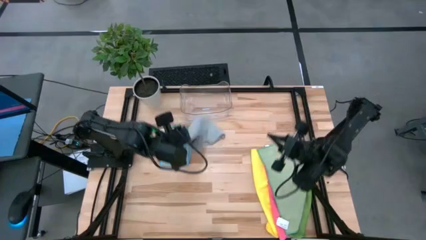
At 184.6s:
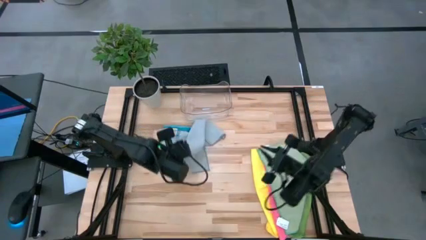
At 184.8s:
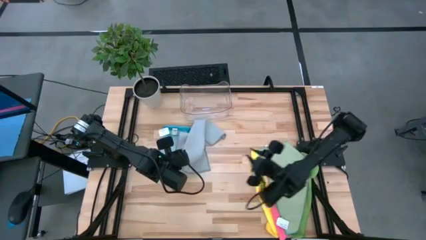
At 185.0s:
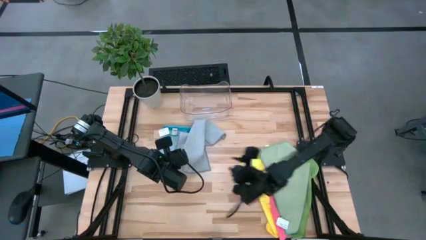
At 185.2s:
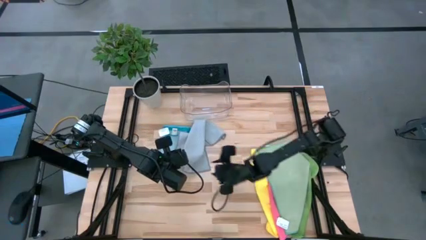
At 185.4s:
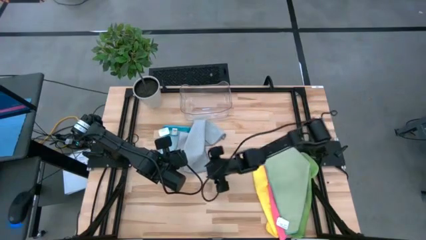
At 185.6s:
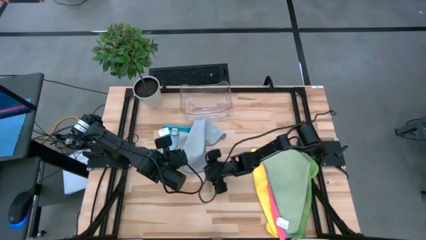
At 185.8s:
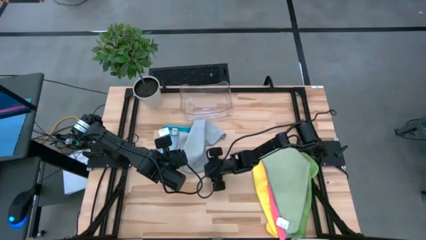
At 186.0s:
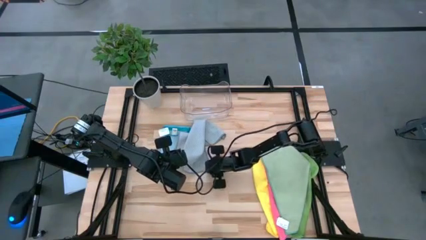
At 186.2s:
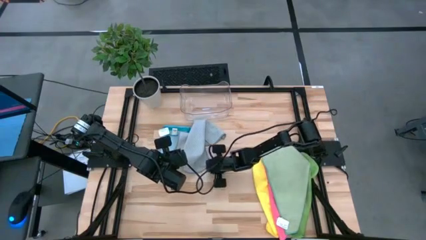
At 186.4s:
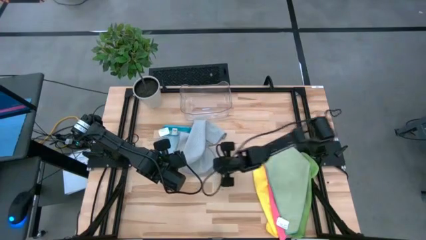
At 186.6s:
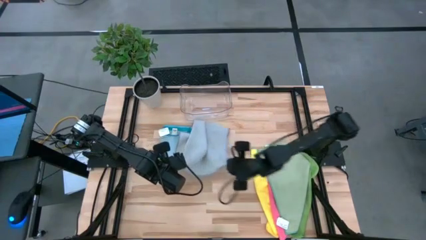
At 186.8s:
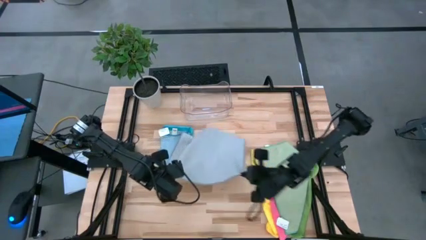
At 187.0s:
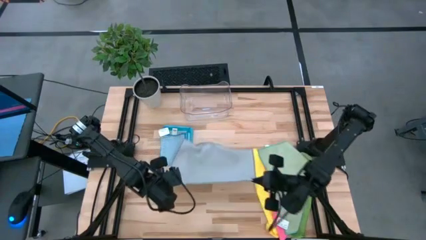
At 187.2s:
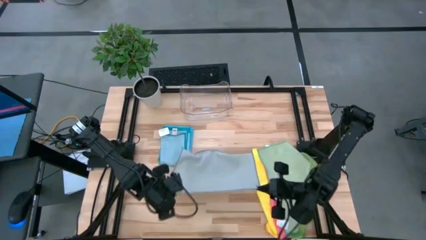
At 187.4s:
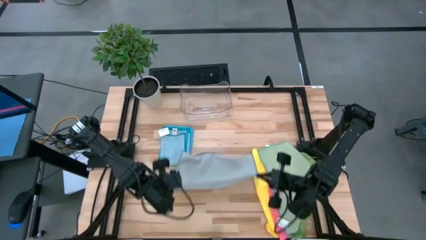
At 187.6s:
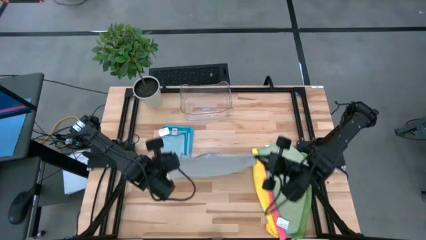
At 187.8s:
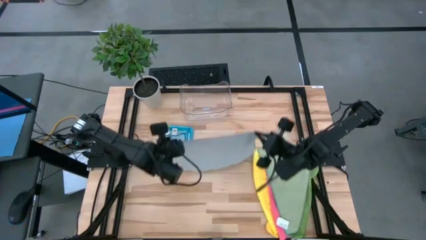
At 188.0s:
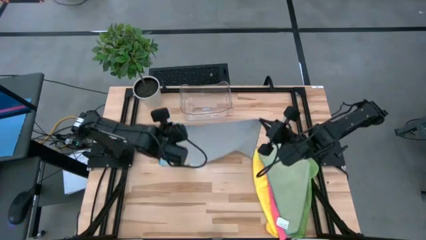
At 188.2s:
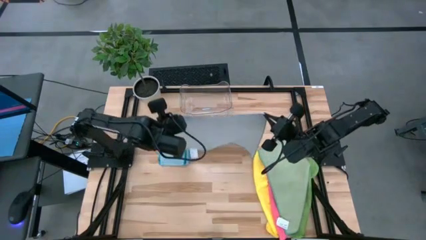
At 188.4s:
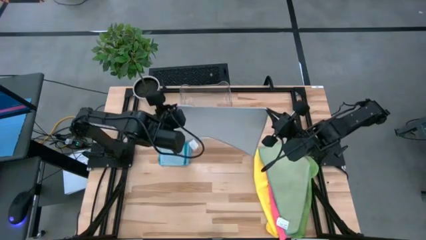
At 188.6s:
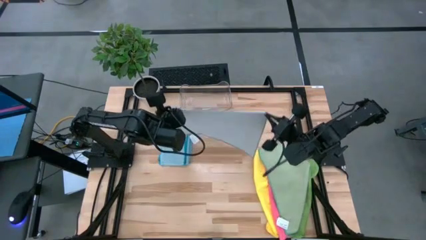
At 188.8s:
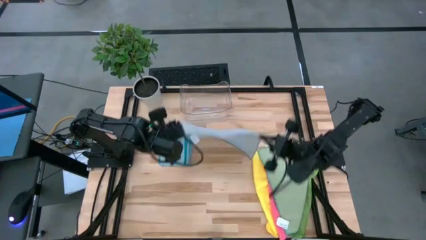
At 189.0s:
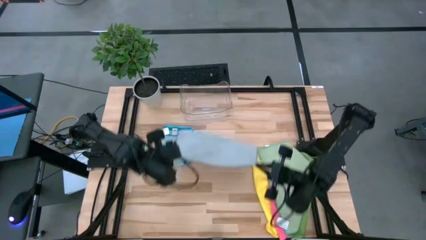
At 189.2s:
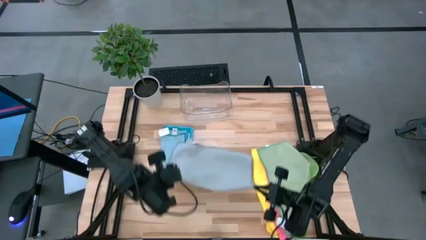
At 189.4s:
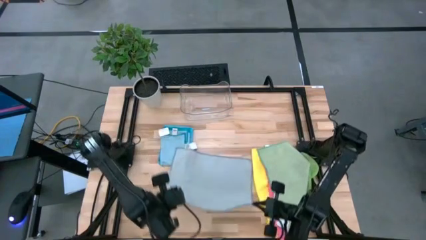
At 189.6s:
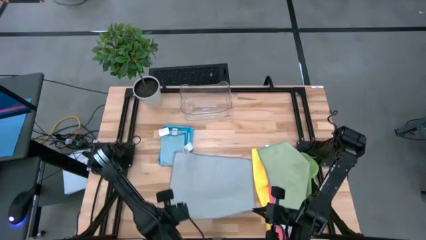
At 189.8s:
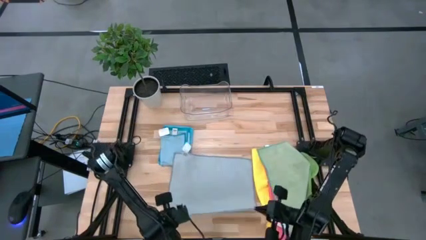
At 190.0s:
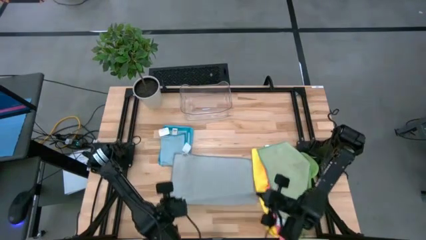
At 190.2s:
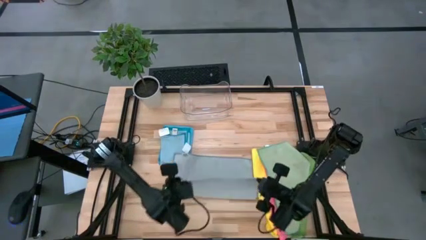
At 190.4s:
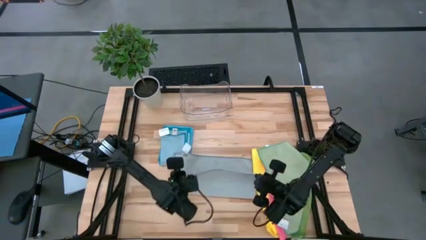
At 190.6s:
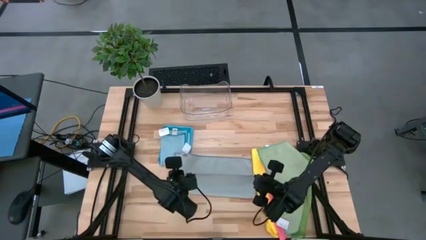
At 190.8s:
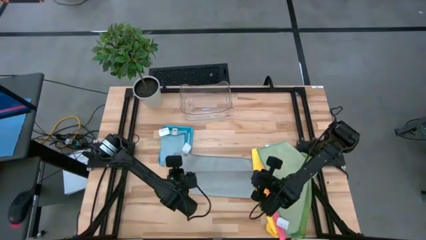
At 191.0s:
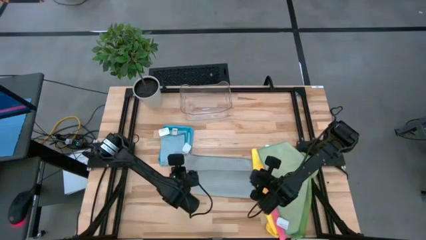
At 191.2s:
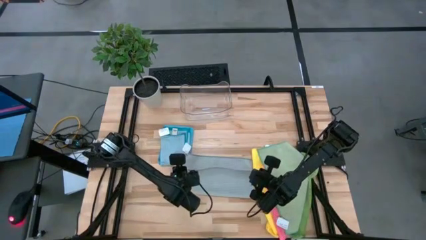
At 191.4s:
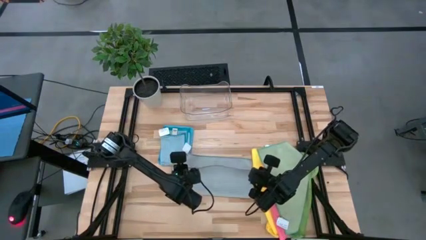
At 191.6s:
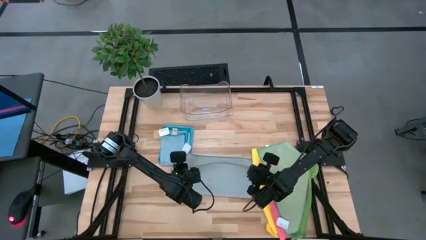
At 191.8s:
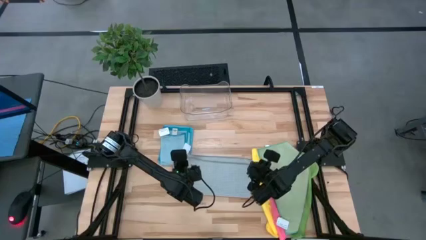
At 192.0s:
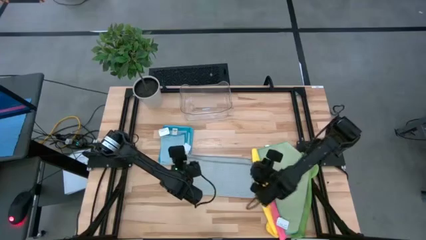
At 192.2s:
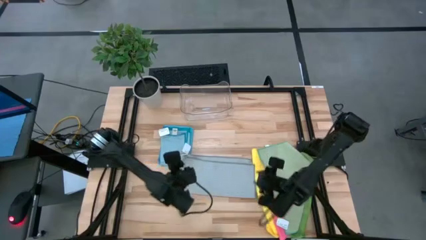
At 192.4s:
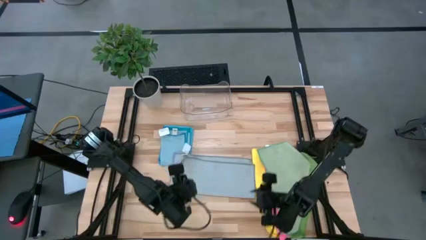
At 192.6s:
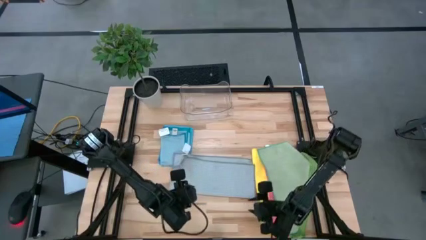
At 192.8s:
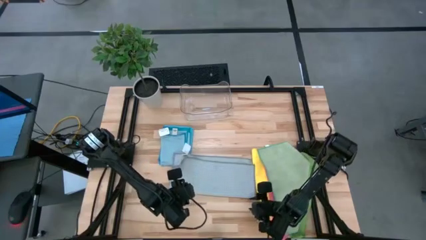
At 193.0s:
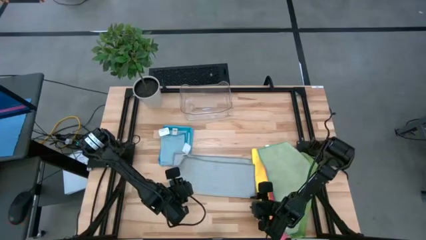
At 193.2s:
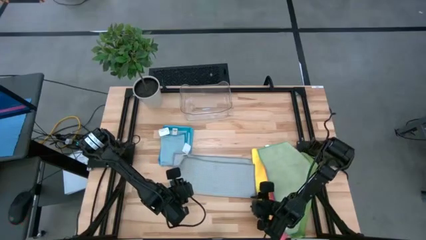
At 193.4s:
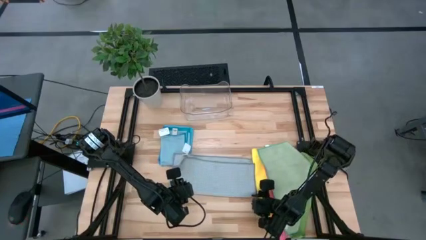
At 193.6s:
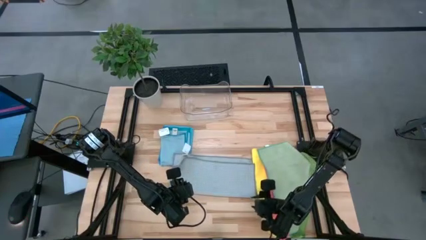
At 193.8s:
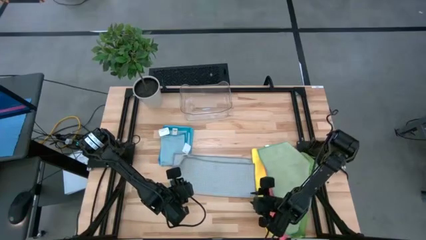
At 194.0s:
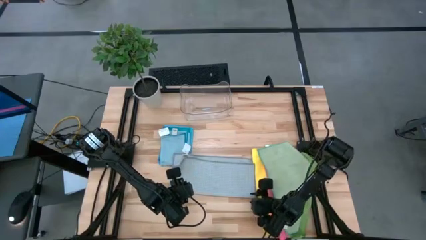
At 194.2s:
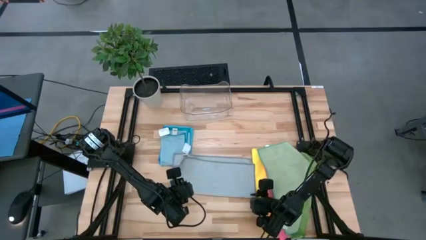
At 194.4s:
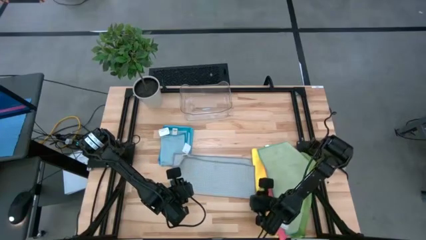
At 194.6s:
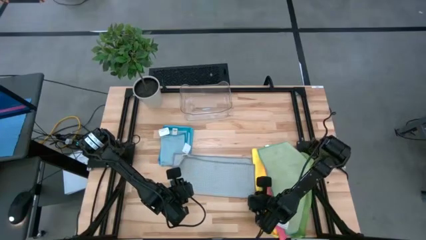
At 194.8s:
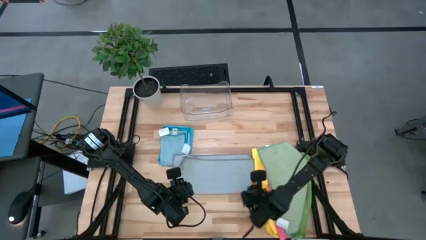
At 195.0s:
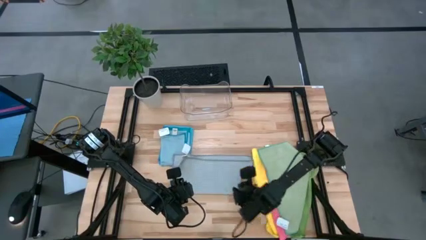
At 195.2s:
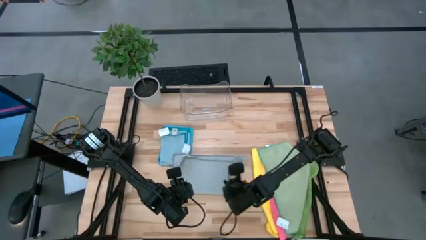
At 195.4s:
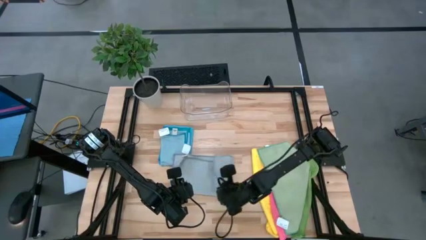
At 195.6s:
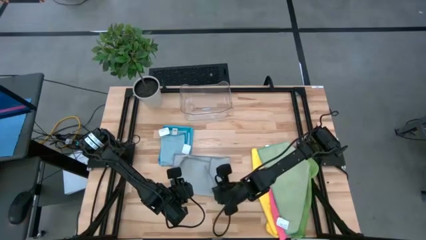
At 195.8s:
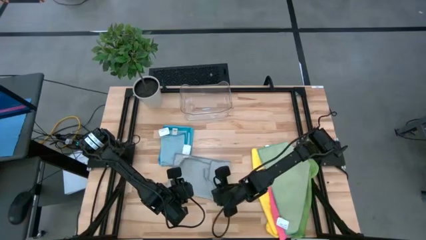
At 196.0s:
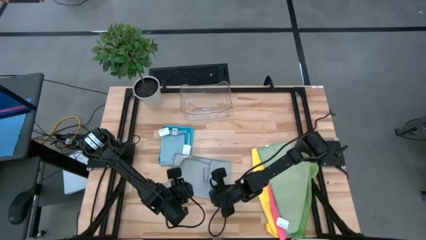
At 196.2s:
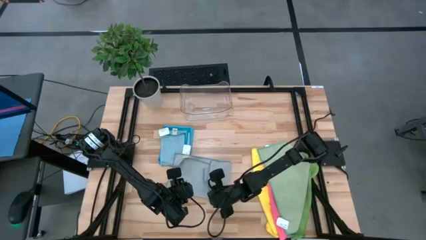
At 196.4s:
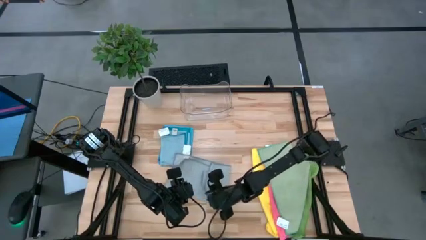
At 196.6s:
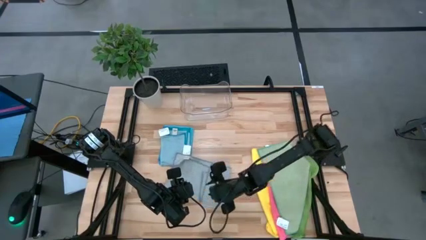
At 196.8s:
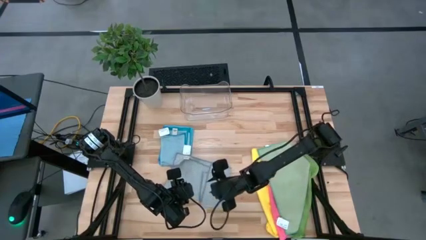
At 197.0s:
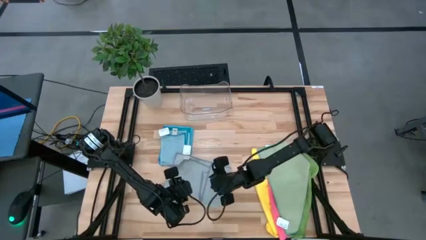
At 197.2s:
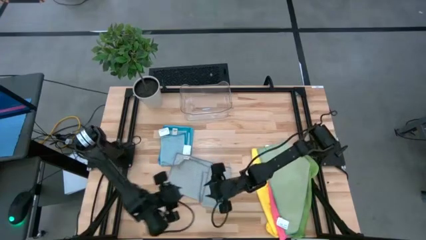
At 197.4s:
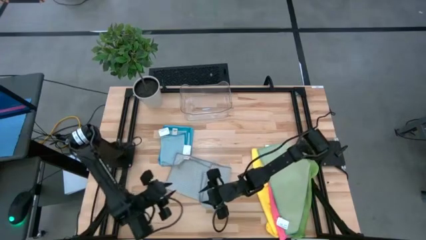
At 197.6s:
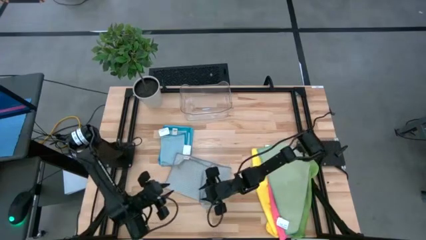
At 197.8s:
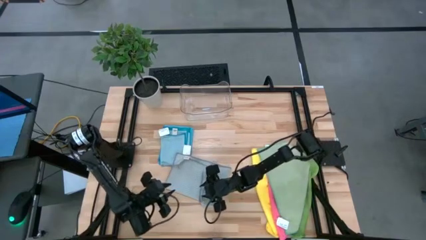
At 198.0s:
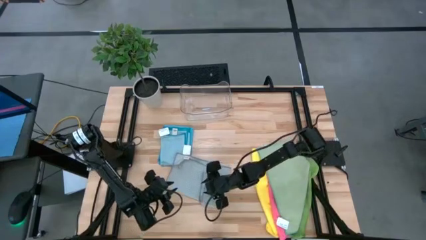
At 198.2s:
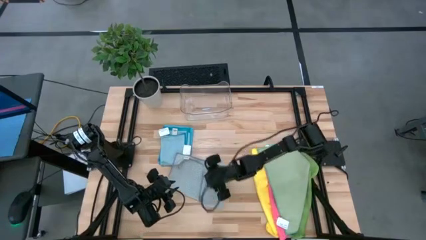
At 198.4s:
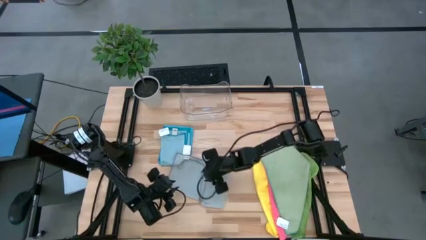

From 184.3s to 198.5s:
Task: Fold microfiber towels
Fold the gray microfiber cloth

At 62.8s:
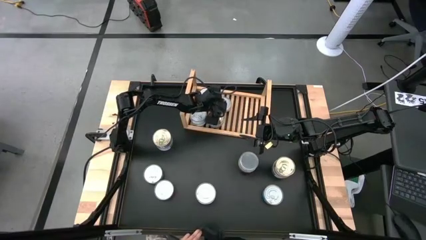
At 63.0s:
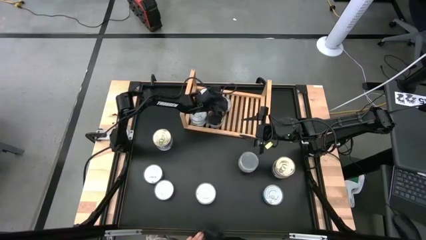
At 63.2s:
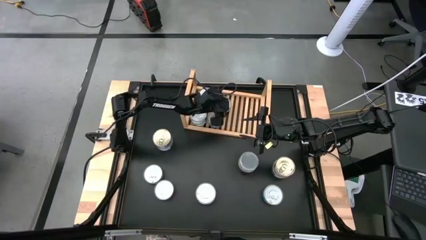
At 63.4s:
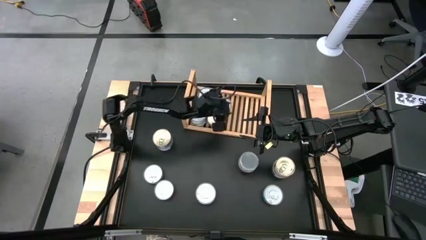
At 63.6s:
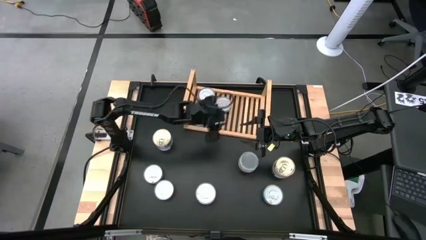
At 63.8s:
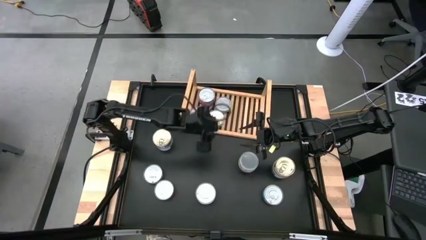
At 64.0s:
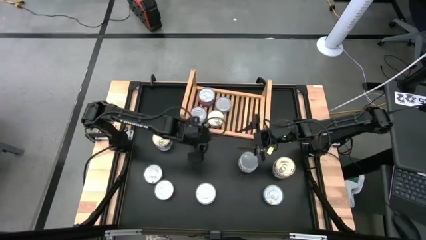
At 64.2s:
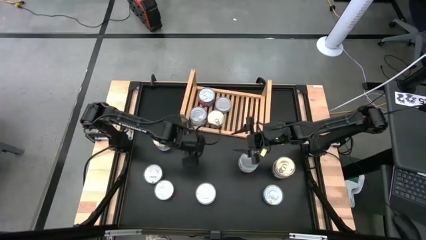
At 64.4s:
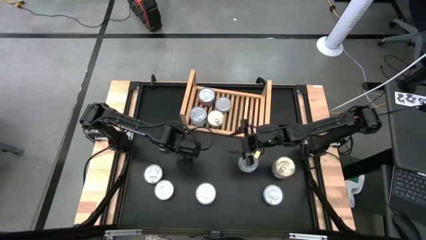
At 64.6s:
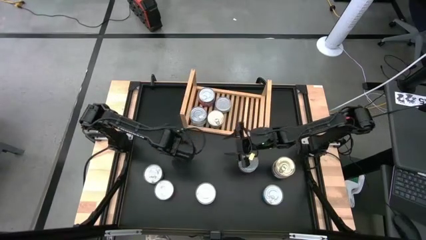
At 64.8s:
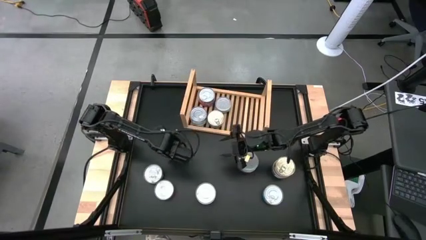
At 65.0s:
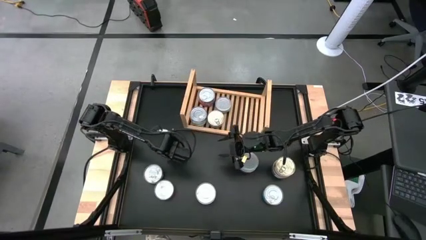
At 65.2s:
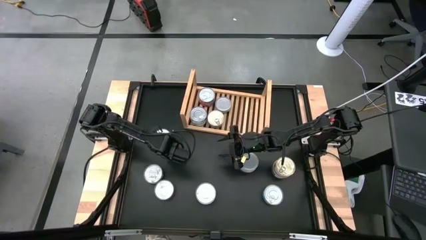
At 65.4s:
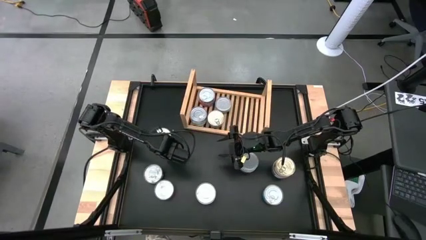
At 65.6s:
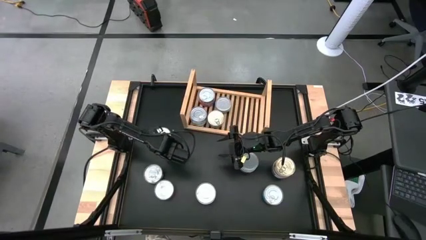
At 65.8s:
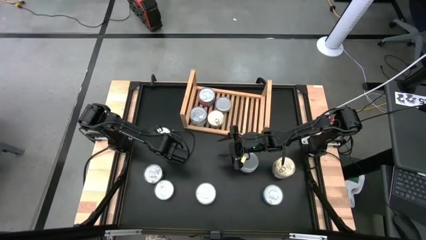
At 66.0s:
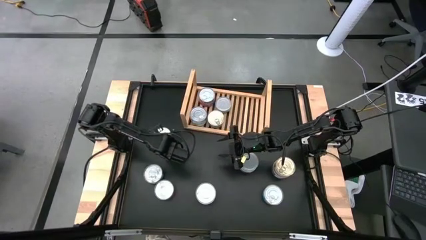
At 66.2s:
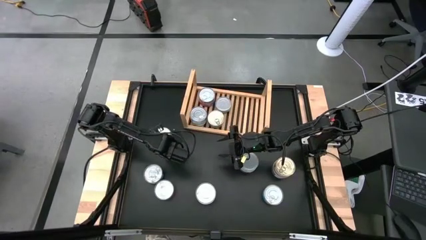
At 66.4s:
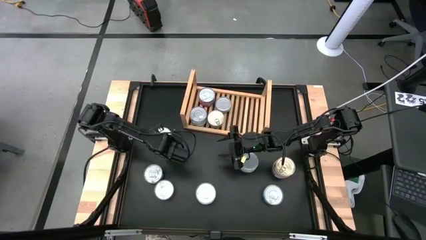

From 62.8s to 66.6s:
Task: Stack canned seafood by type on shelf
Stack the blue tuna can on top of the other blue tuna can on the shelf
